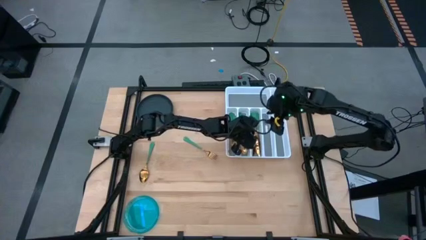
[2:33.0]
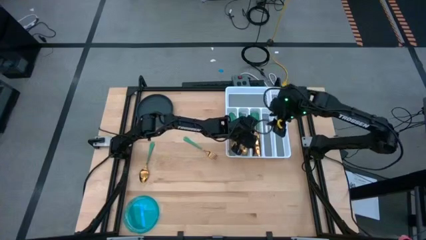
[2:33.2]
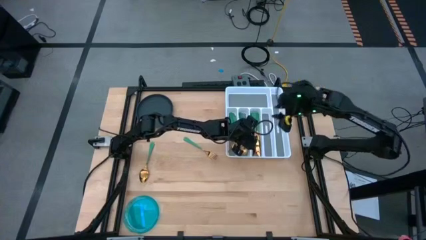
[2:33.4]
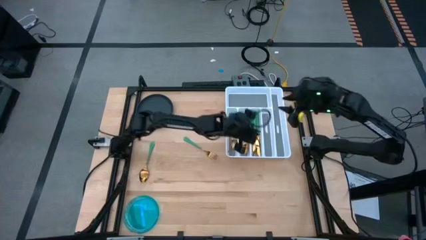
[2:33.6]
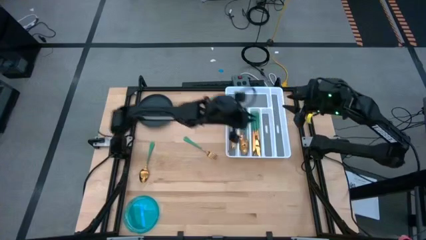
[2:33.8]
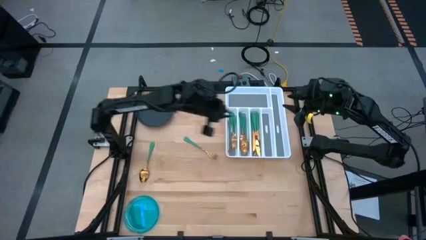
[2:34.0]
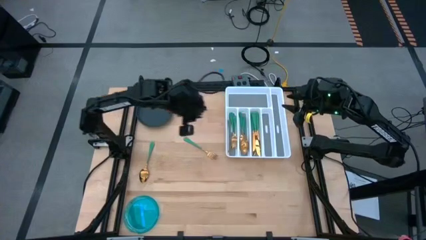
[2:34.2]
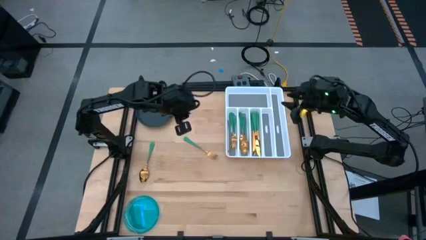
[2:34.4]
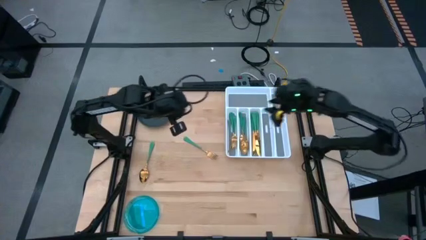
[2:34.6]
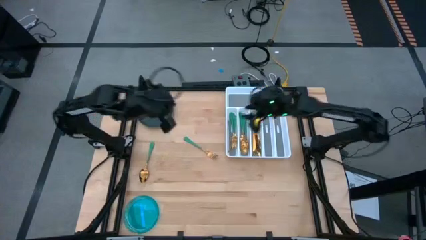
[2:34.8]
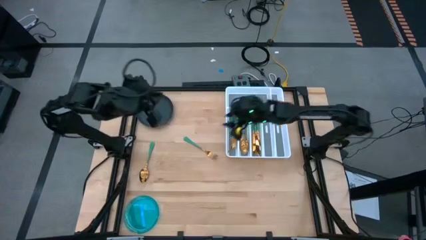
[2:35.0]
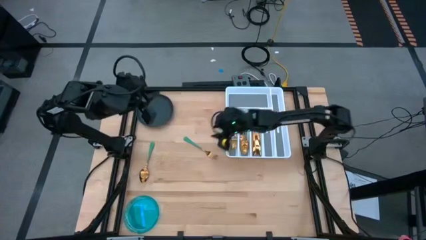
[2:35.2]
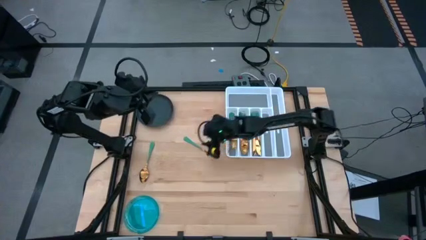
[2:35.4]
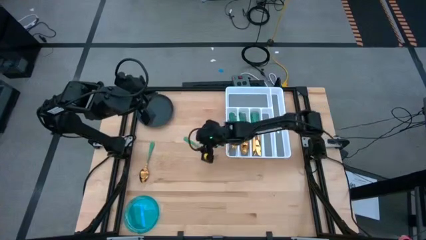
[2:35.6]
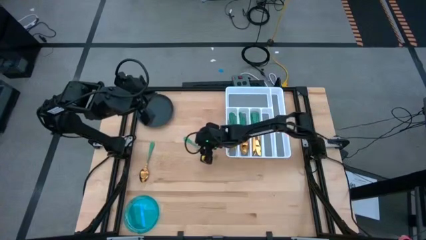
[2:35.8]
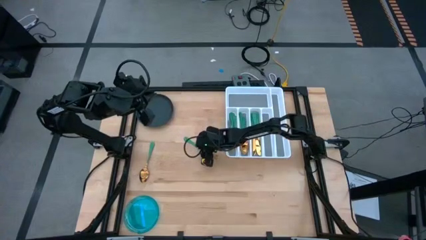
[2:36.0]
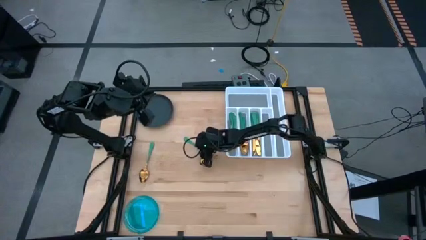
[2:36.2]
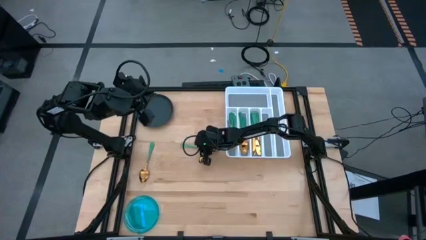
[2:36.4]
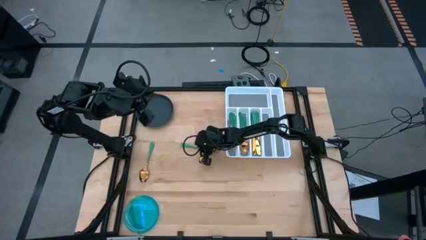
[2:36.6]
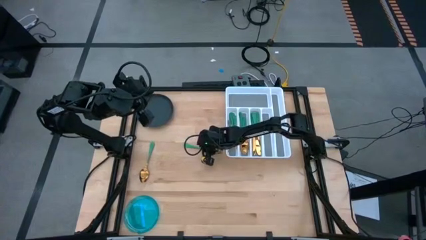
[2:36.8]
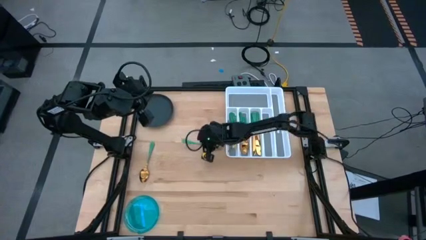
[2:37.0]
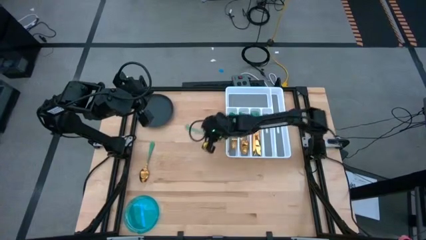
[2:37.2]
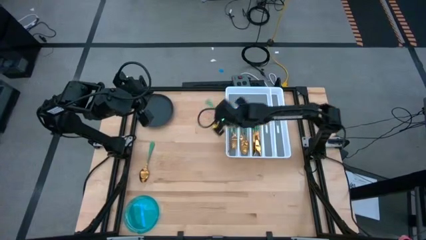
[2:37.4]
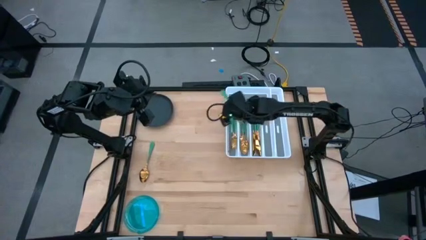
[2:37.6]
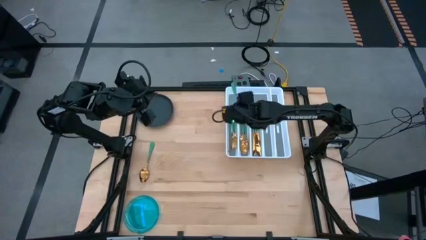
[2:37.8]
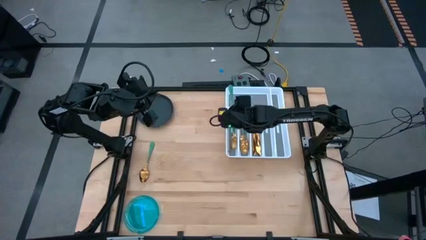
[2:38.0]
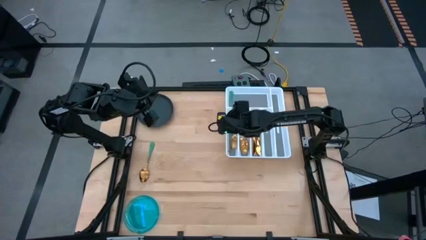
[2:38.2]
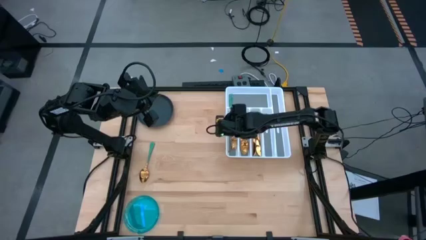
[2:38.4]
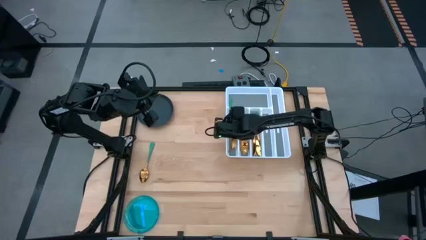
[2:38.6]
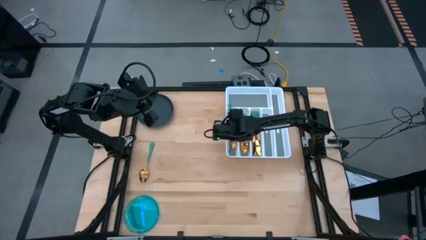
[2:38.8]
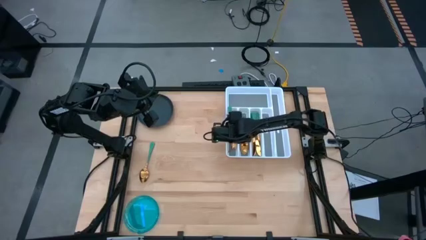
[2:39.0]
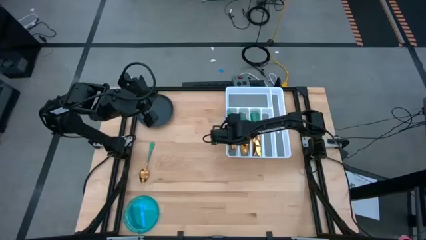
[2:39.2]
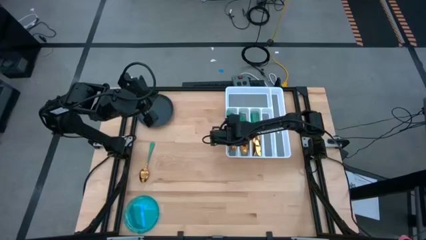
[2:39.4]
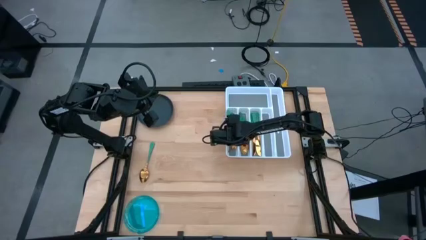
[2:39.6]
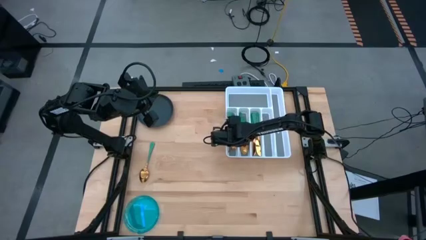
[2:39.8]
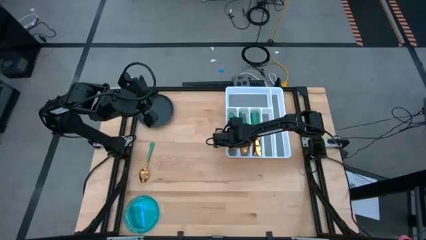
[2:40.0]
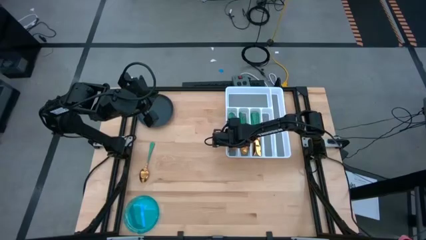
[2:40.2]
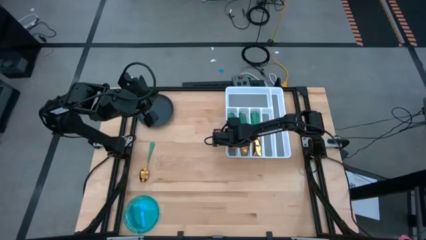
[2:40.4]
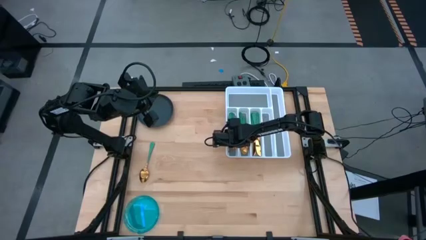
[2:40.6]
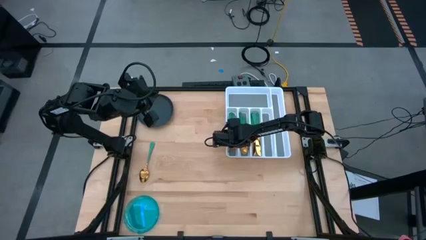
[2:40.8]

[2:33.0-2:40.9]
Task: Sort silverware
Put the green fork into the white silverware organizer

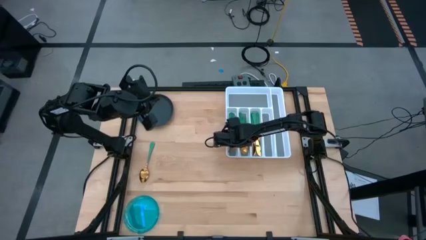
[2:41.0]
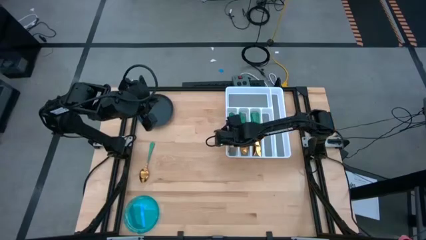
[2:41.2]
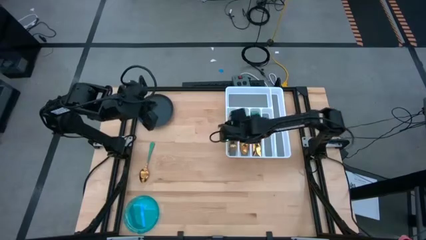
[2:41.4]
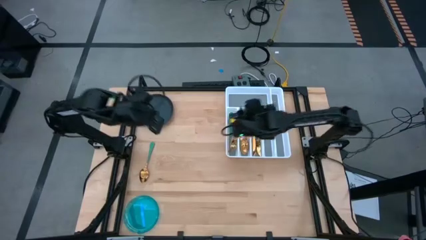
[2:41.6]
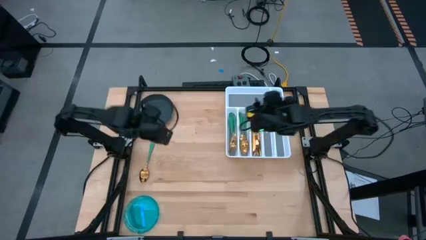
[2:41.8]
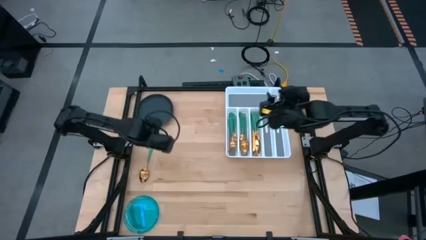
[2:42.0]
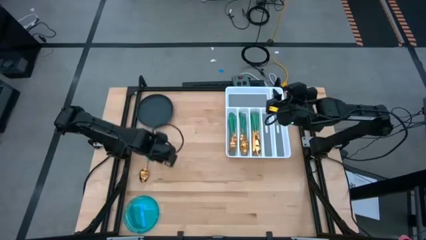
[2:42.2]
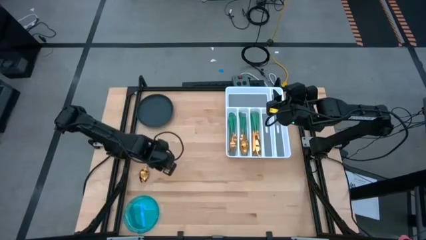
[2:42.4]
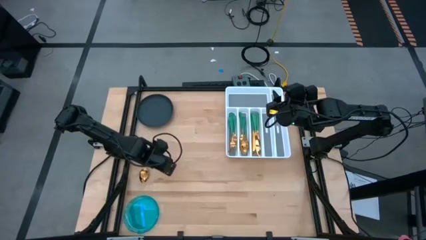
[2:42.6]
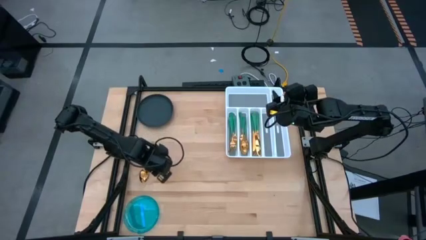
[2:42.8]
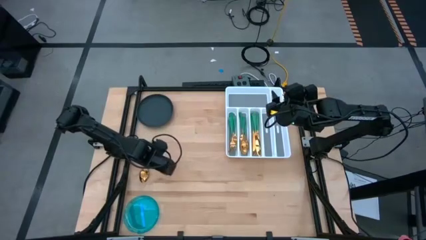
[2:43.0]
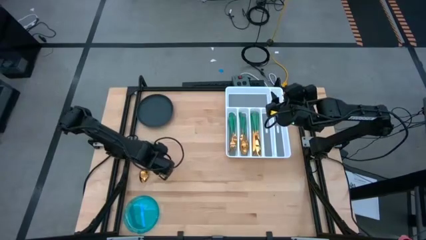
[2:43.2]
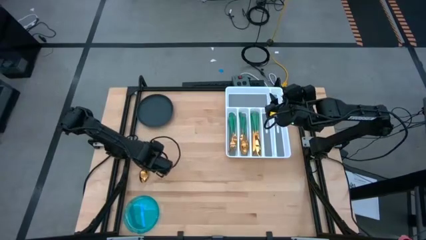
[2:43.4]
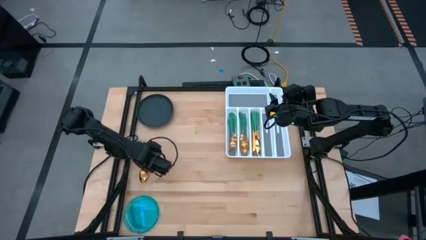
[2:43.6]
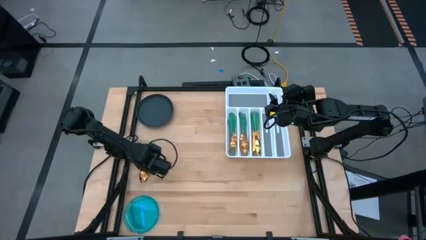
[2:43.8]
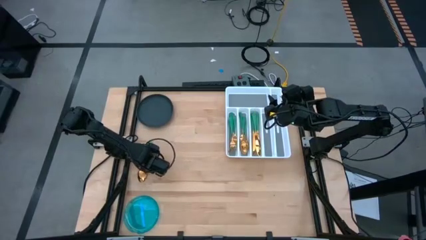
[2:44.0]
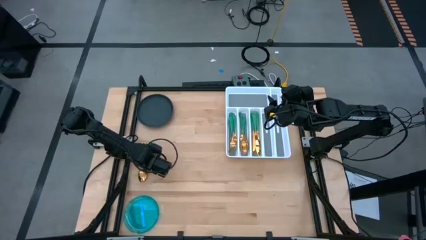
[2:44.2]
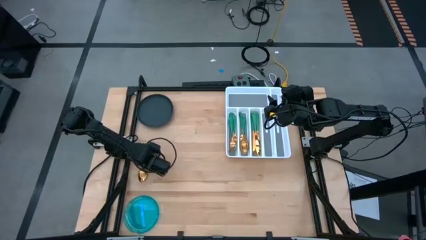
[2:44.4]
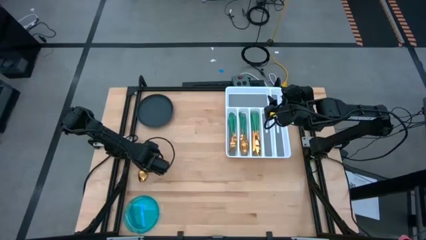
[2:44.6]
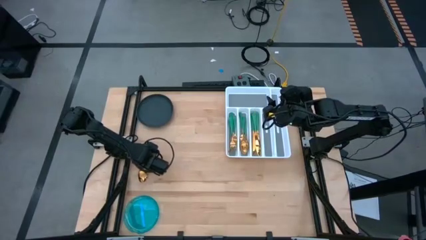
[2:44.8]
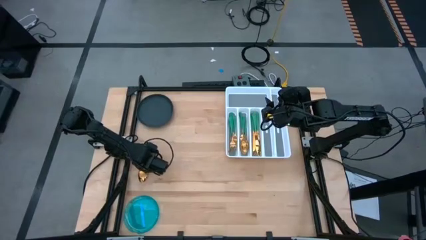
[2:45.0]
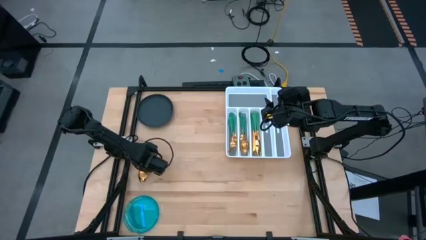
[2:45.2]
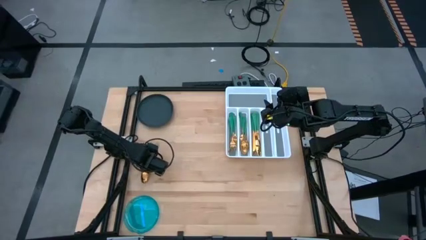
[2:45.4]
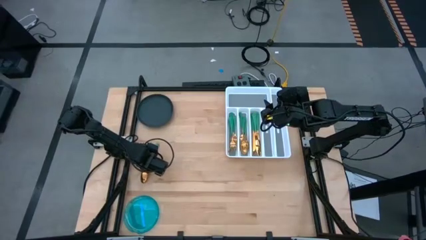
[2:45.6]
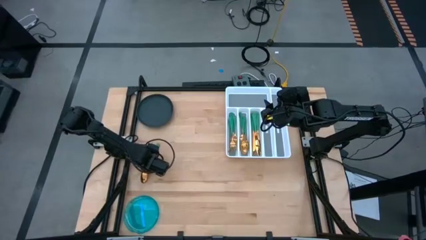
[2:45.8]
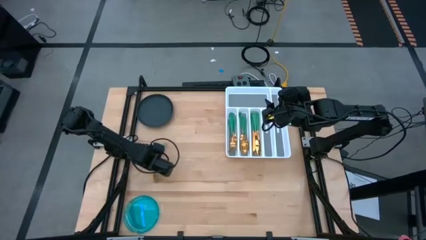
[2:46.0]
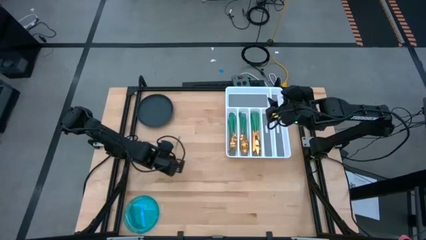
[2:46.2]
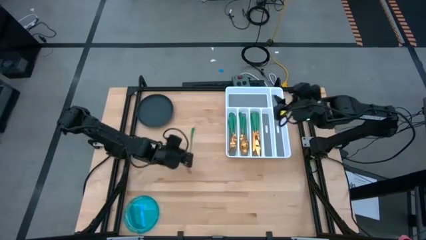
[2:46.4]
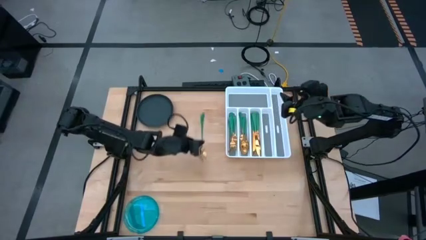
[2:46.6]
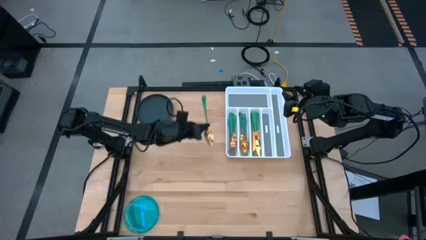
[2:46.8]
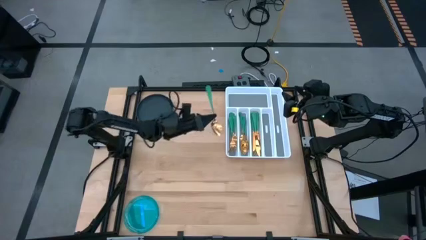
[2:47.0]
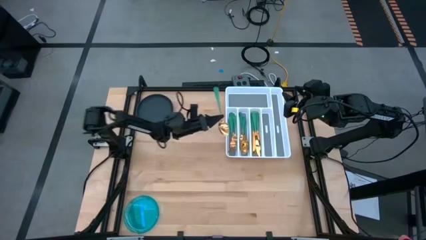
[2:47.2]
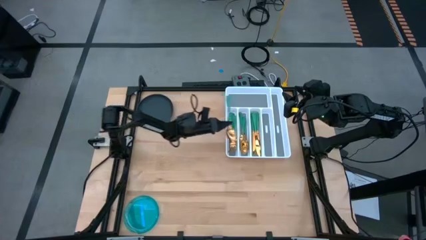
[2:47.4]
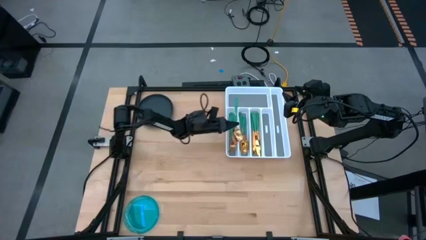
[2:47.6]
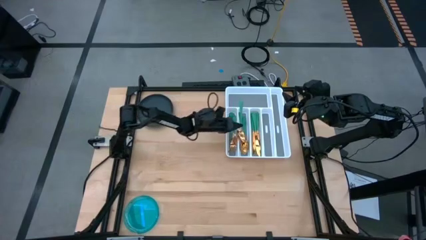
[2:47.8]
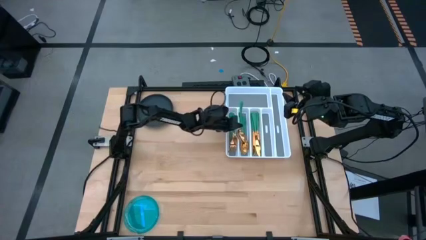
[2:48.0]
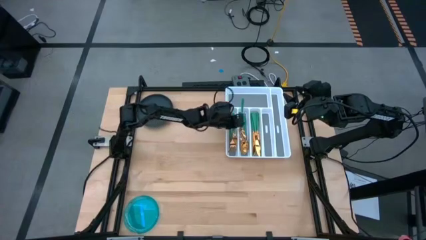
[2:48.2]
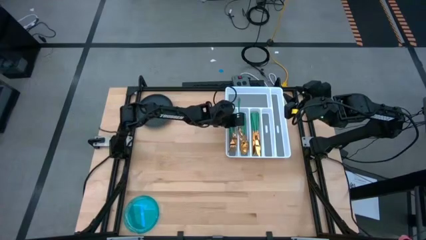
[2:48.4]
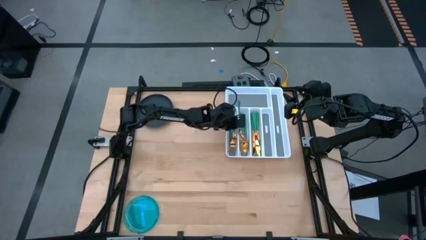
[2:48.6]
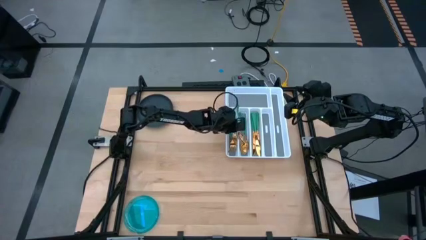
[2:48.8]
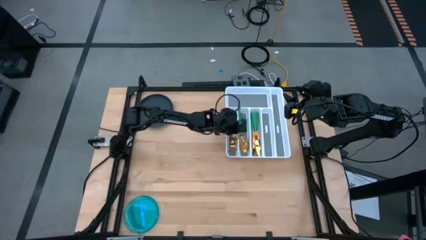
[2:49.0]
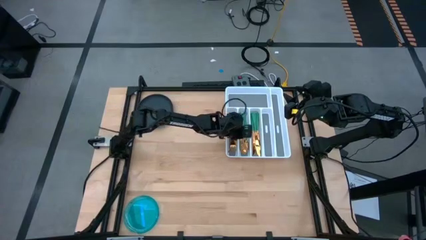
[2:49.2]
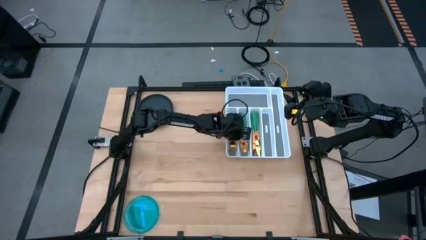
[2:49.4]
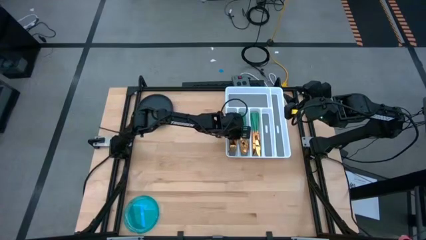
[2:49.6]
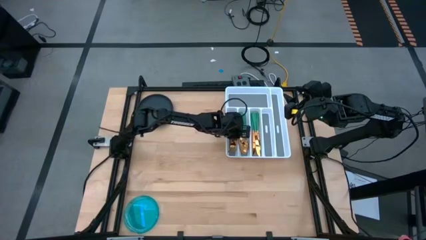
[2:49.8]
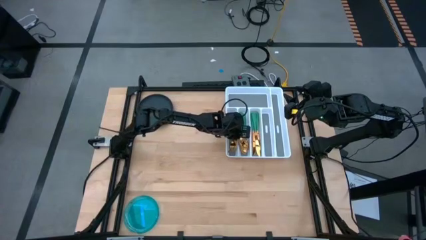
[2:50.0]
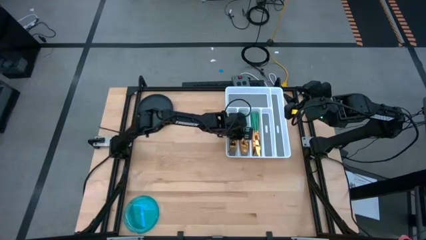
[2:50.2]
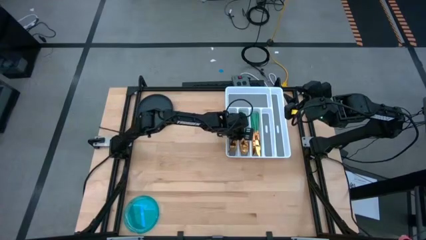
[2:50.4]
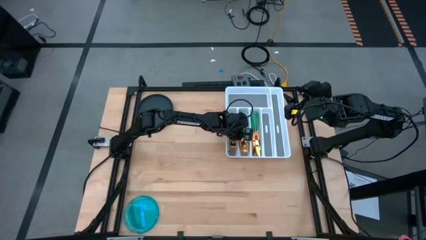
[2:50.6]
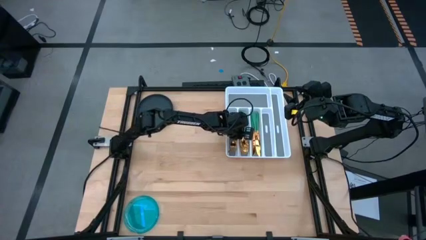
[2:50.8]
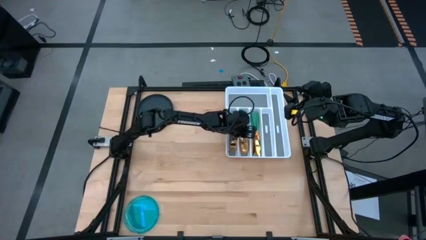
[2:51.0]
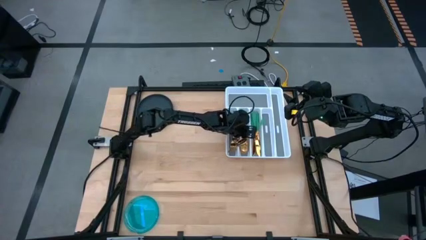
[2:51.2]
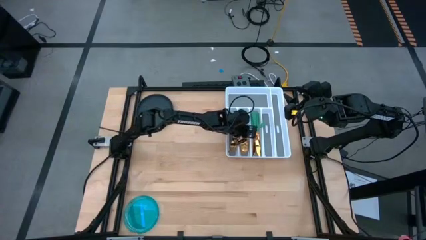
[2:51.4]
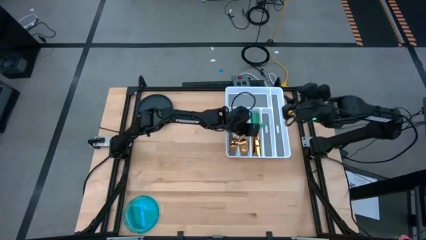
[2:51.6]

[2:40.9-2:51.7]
Put the green spoon into the white silverware organizer
